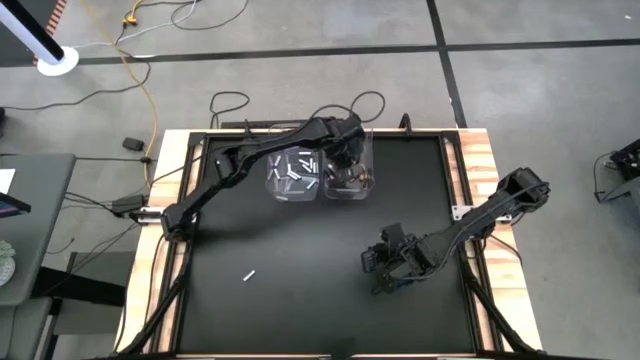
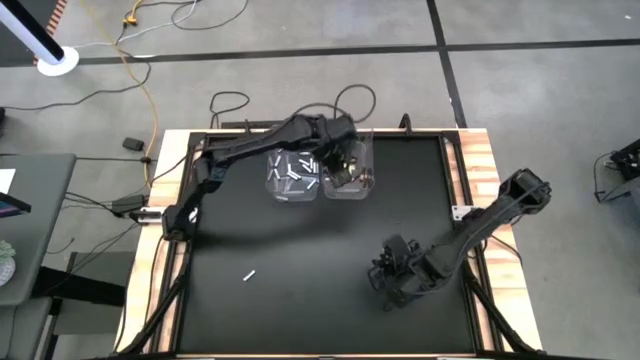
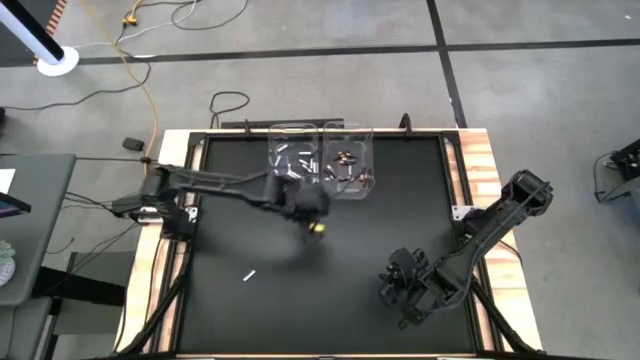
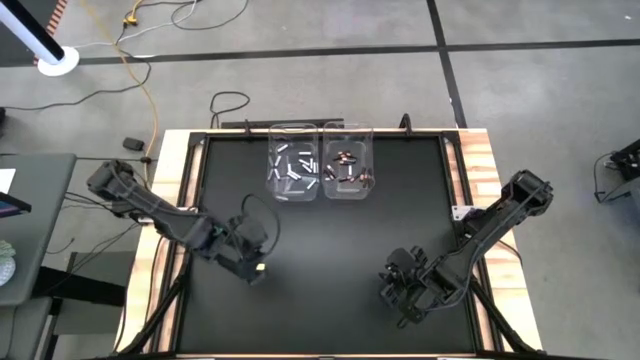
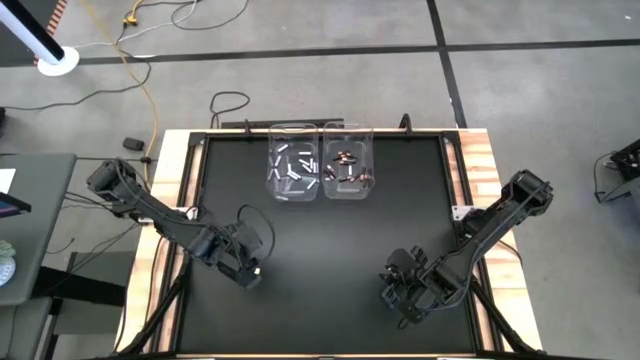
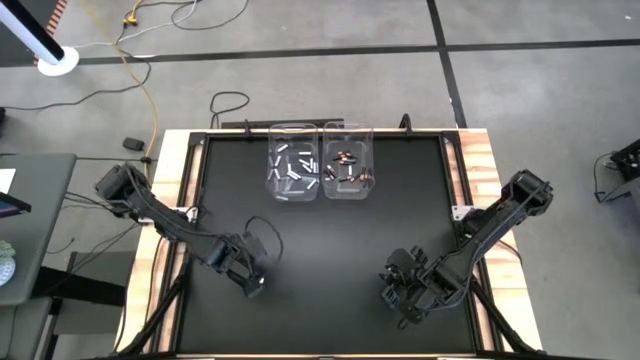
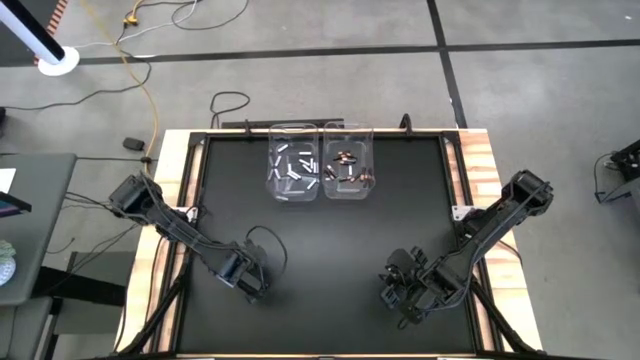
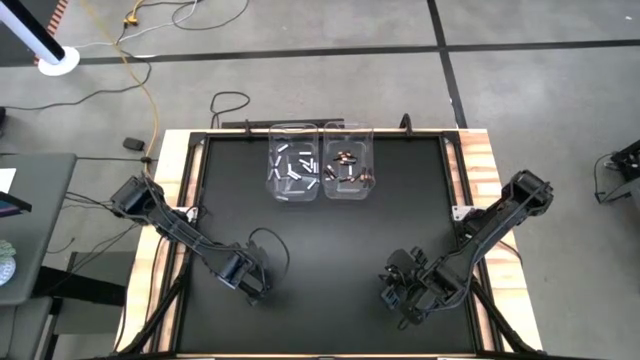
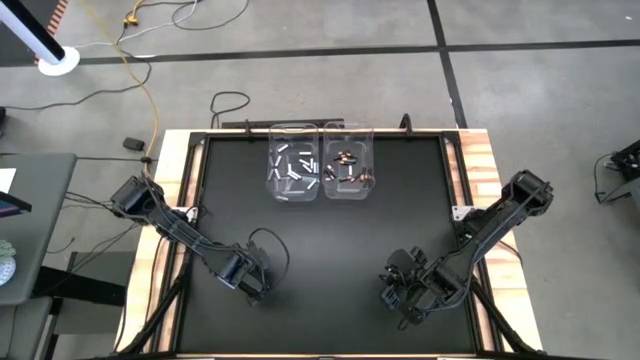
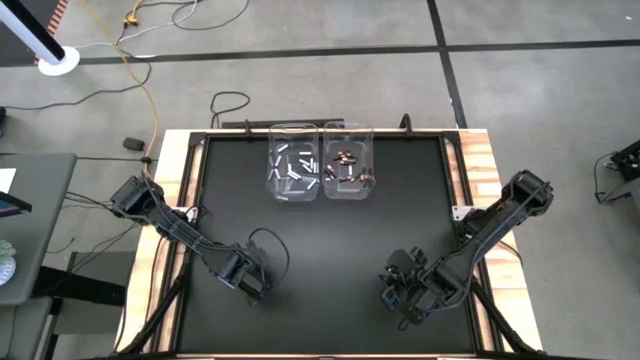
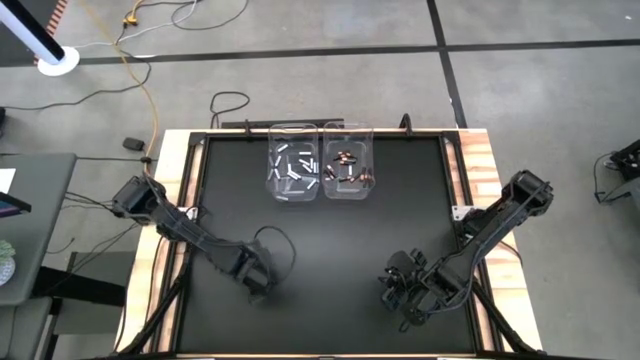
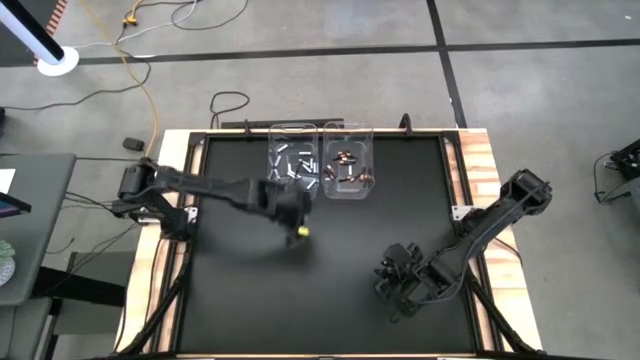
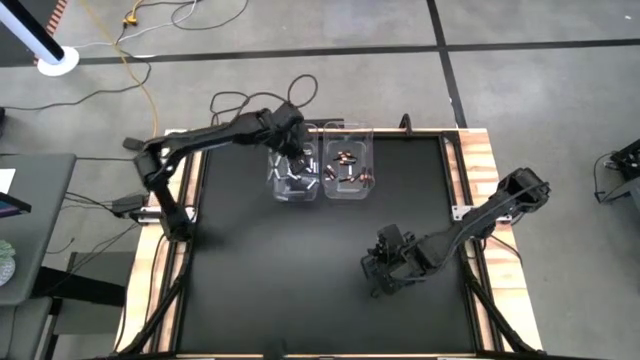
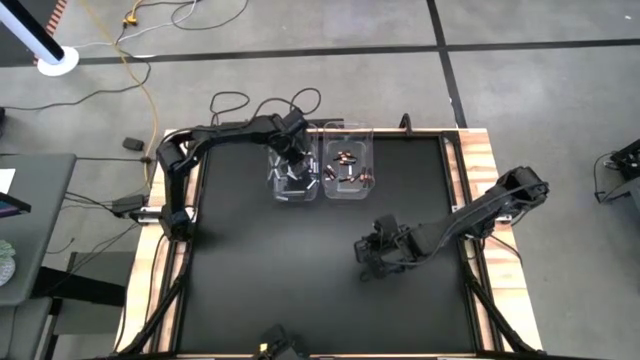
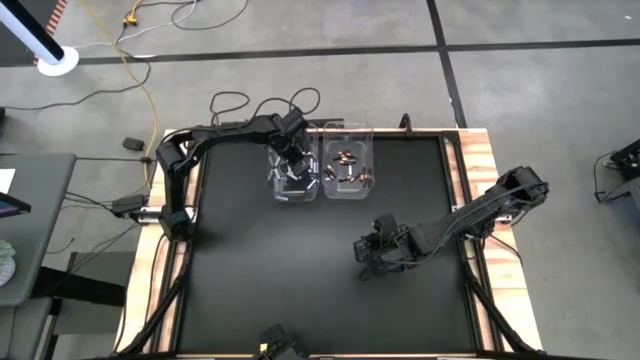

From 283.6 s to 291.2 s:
Task: Sort batteries
Put the white battery into the left transparent bin

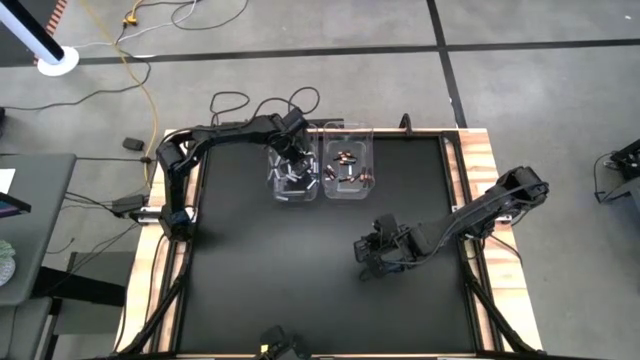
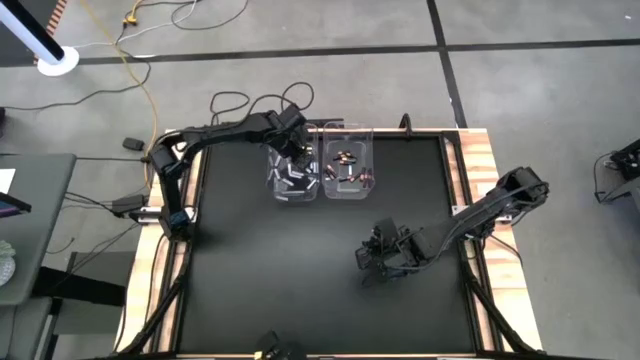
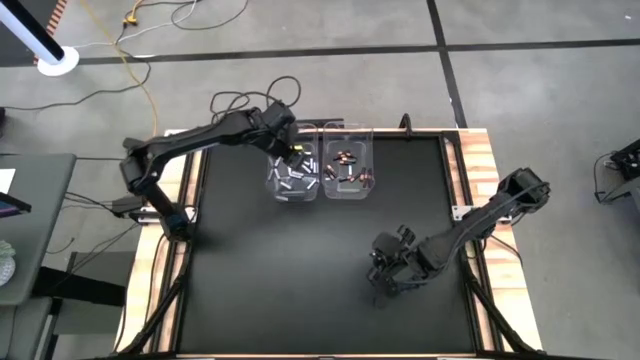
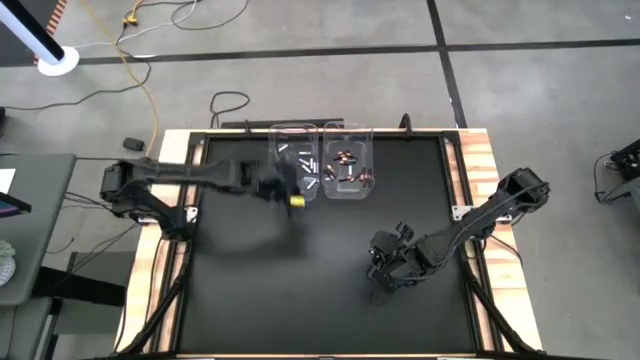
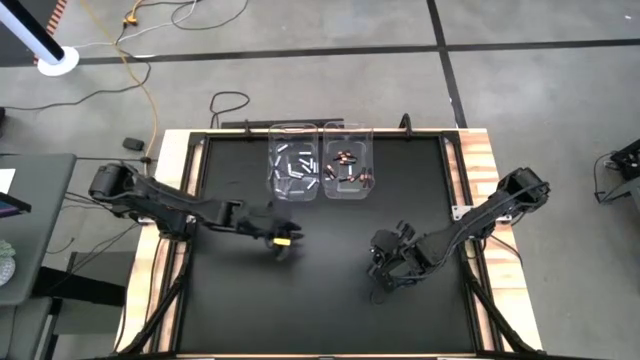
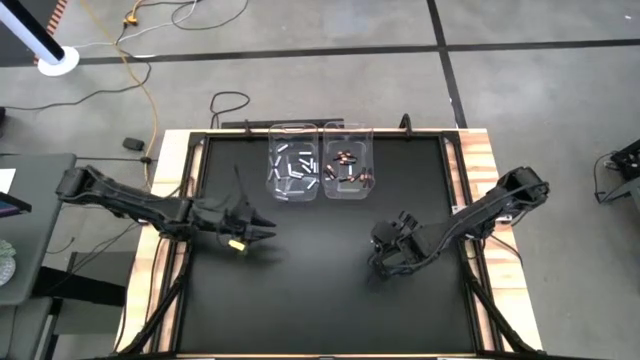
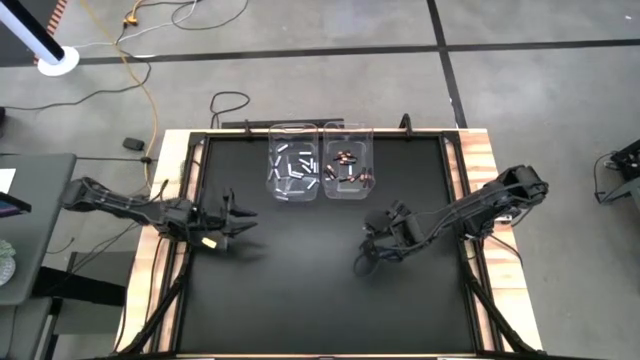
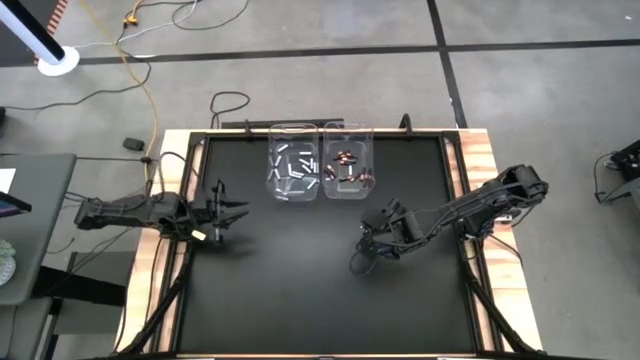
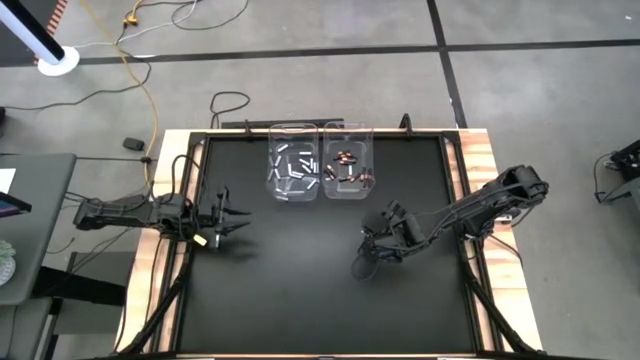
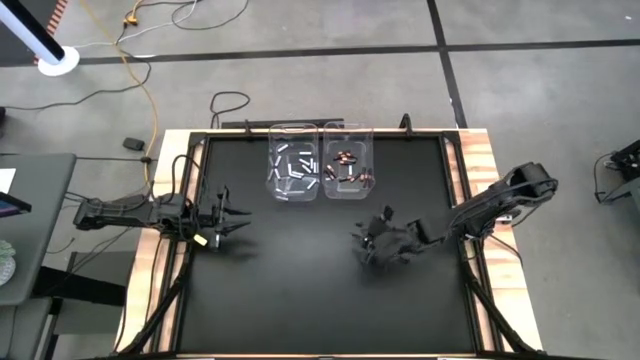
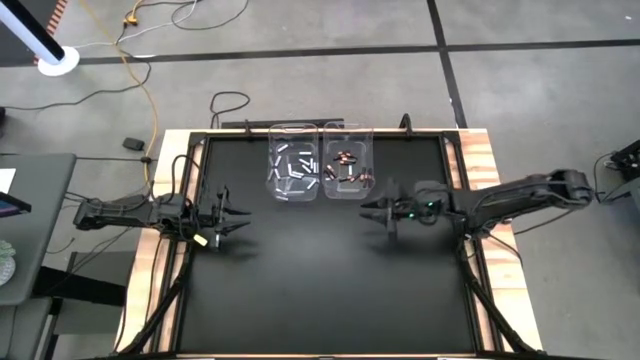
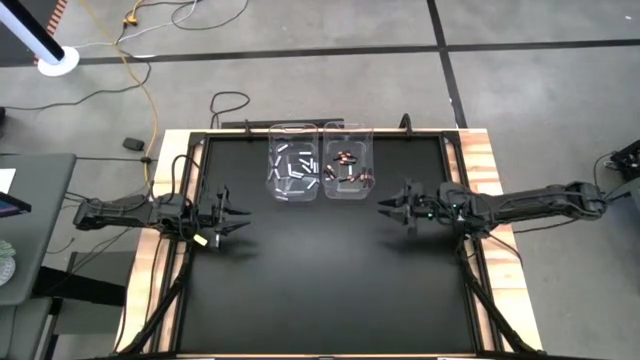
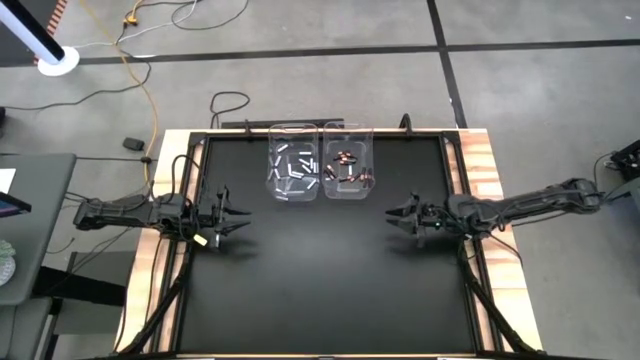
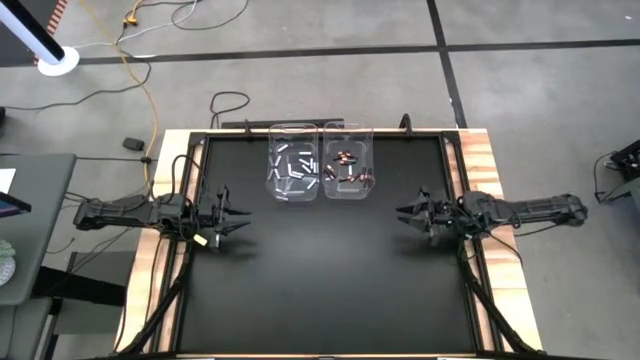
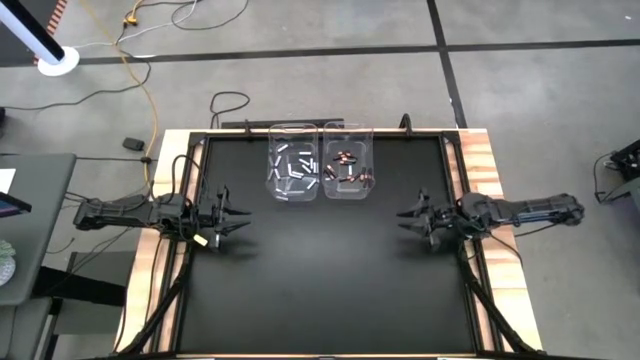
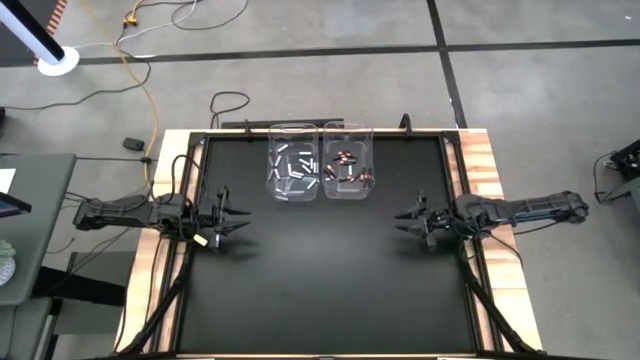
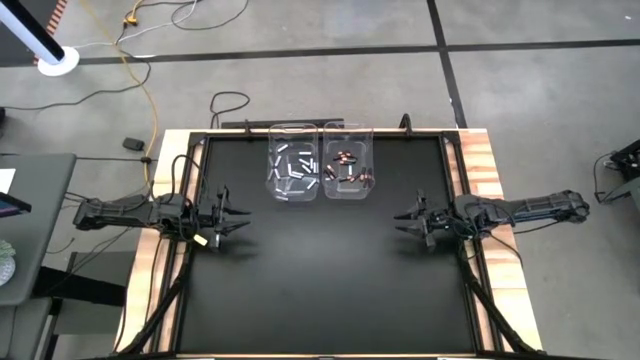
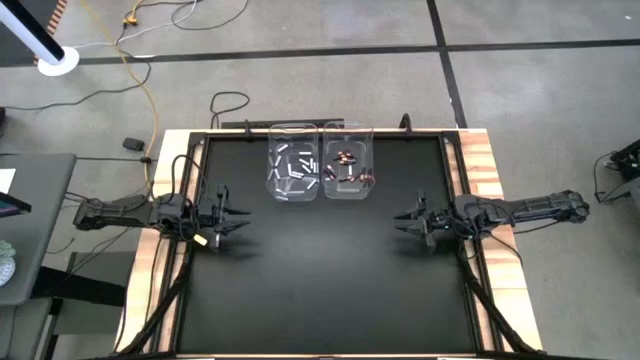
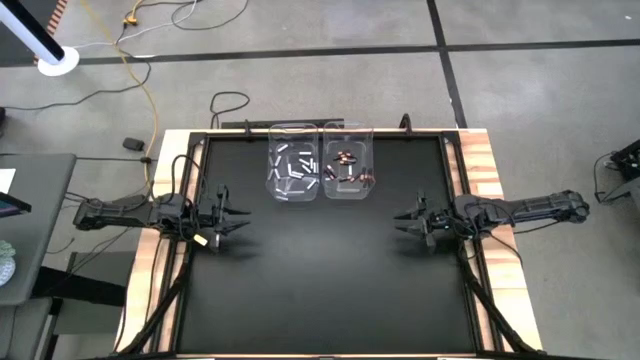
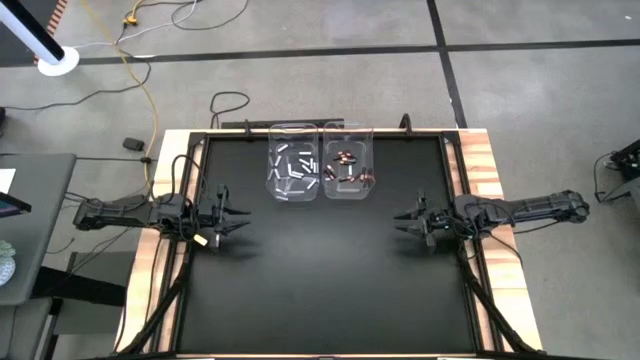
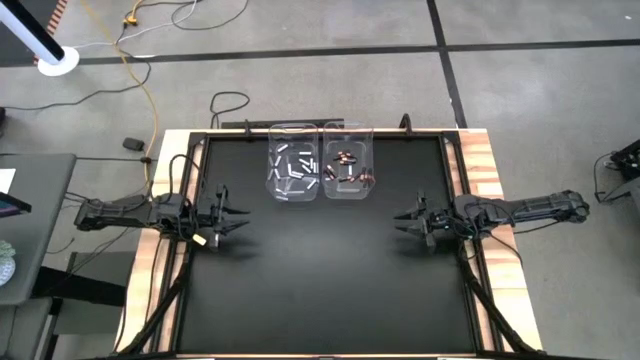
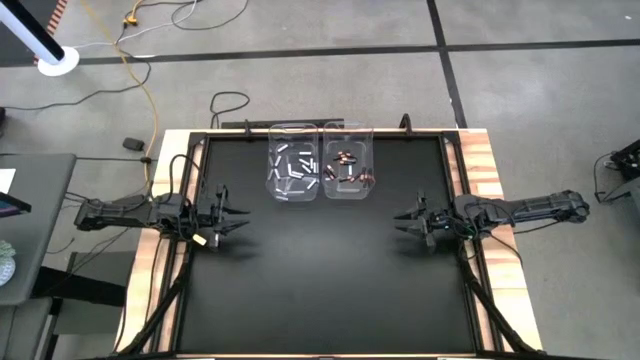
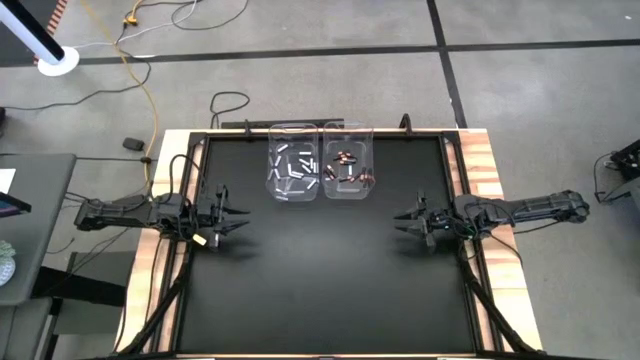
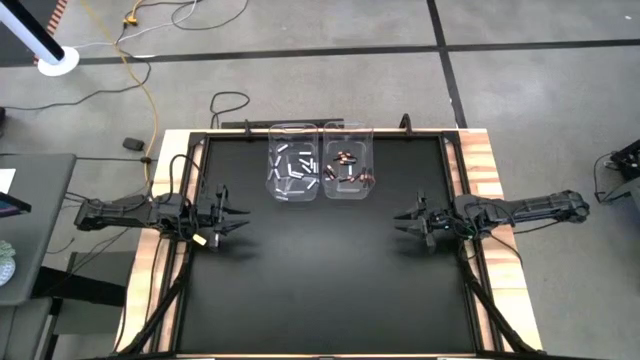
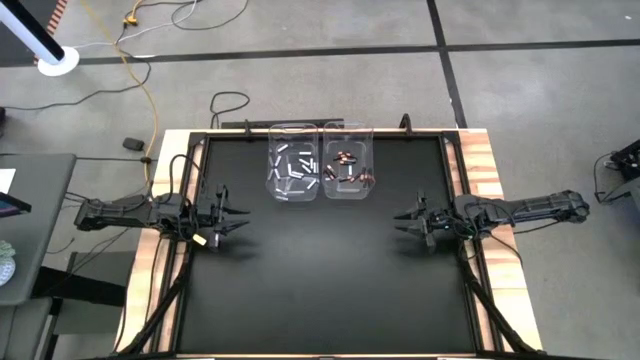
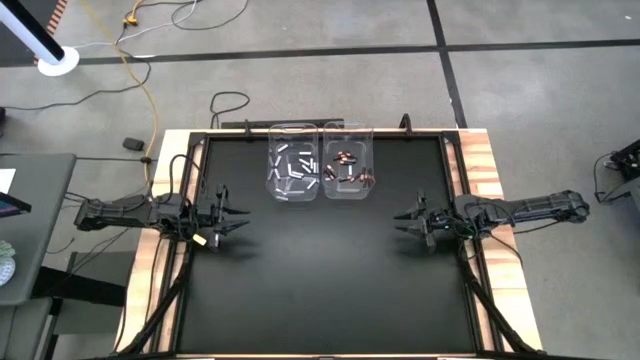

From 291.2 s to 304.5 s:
Return to Home Position
